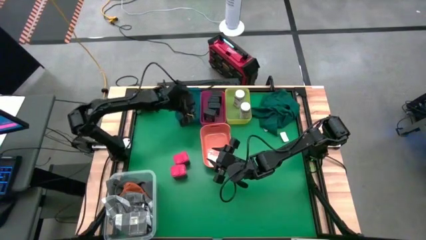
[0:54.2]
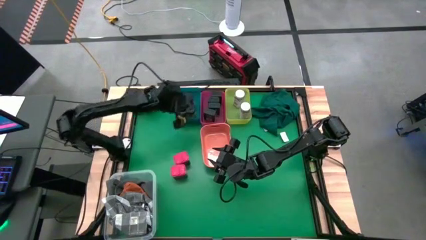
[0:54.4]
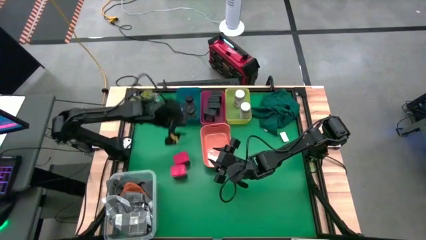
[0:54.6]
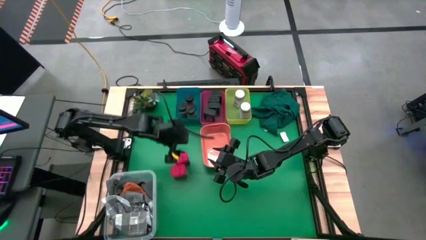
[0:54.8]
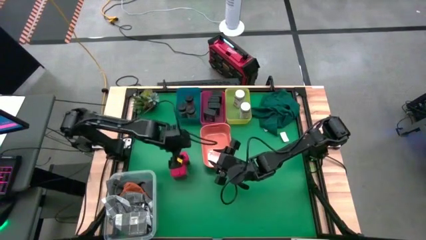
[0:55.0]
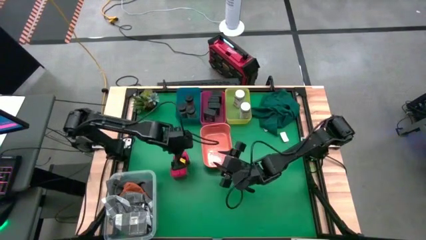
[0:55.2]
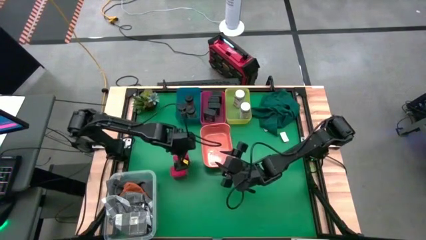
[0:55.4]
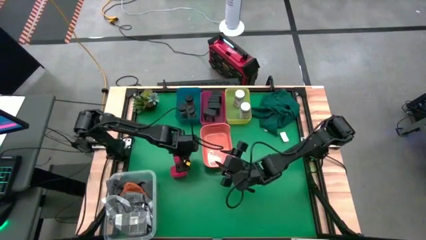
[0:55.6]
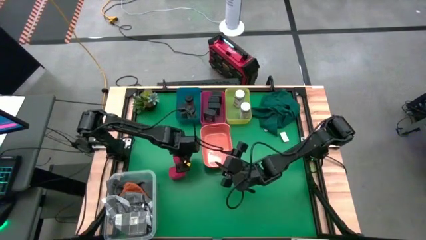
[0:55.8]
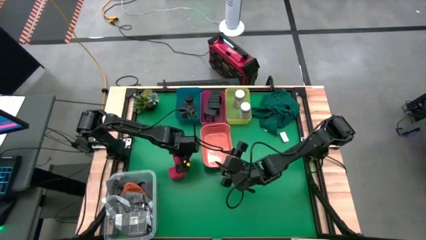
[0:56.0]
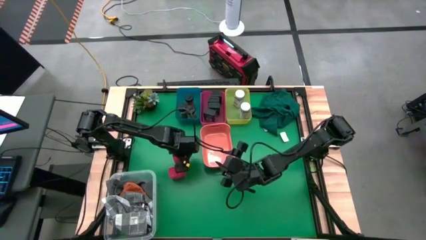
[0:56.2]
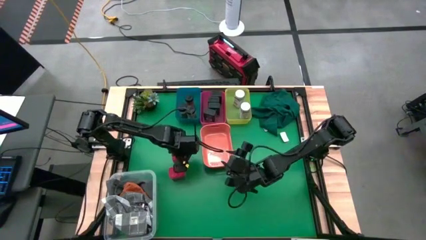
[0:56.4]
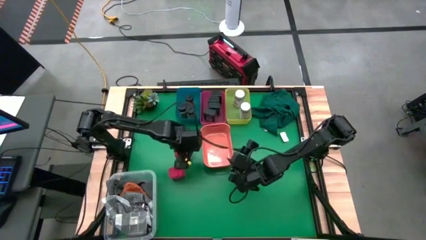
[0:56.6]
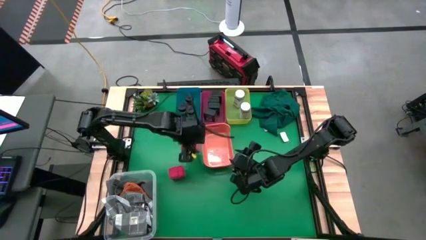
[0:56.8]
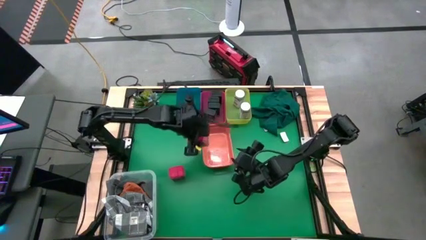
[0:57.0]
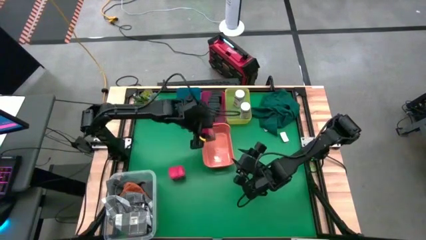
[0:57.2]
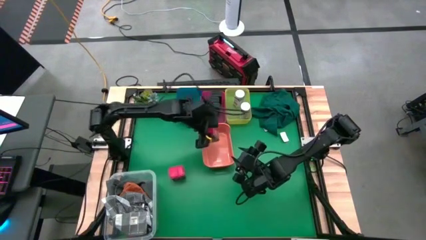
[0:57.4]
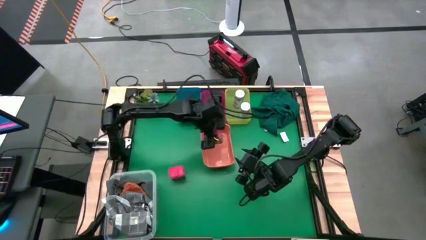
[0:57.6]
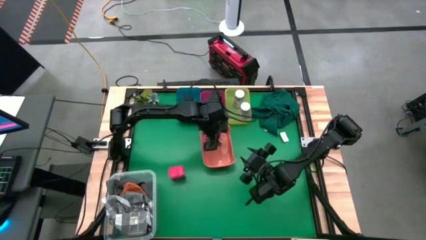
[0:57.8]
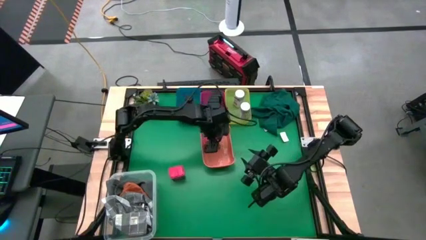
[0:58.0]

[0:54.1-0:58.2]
Task: Sort spices by type
Put the top red seasoning can into the orange bin

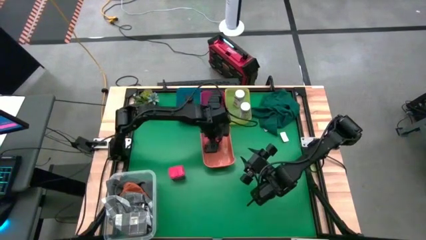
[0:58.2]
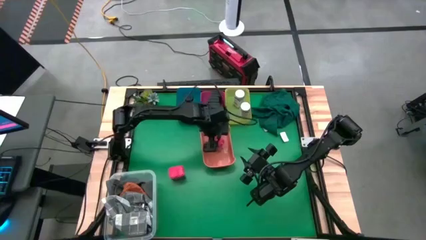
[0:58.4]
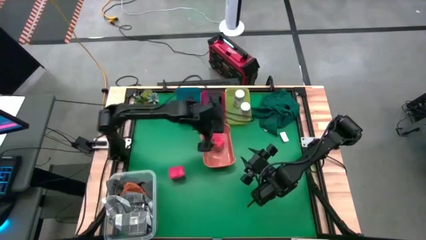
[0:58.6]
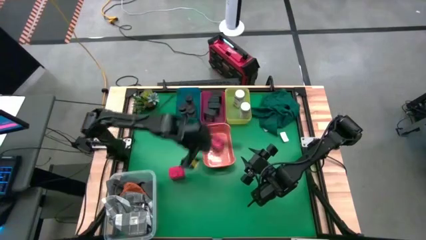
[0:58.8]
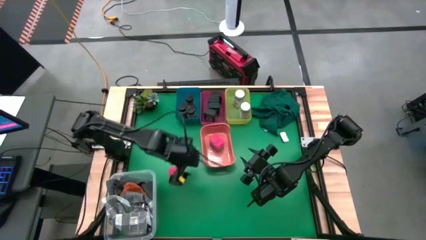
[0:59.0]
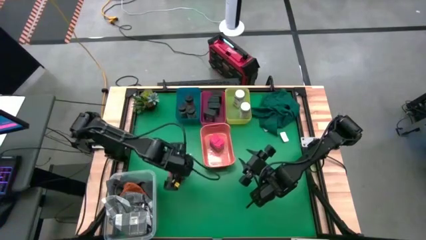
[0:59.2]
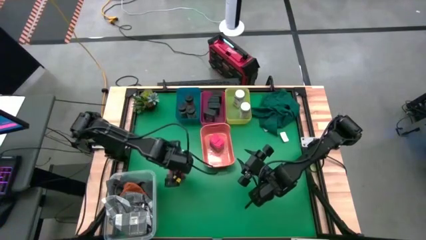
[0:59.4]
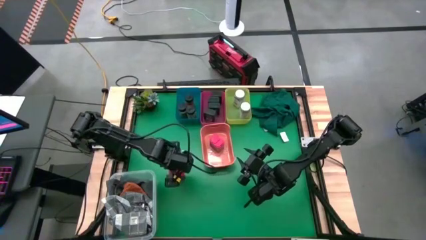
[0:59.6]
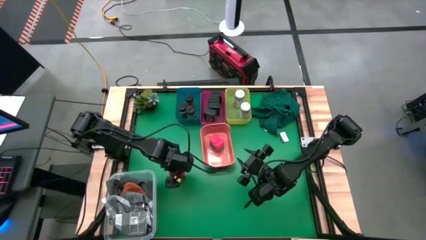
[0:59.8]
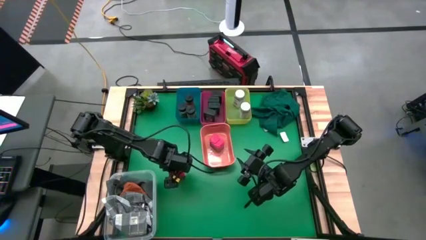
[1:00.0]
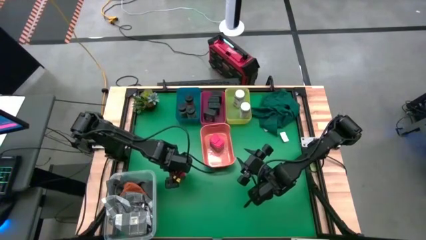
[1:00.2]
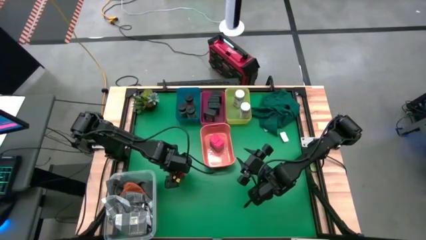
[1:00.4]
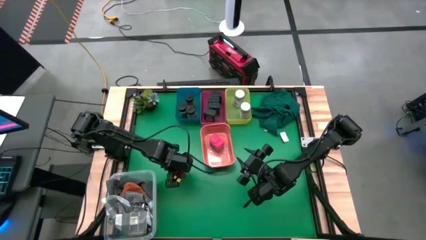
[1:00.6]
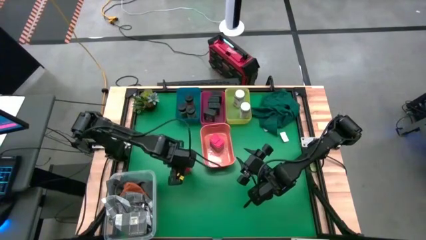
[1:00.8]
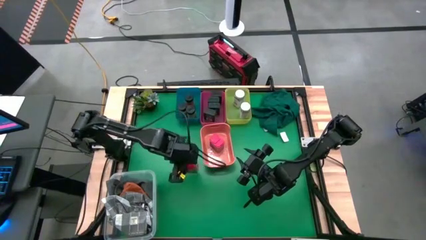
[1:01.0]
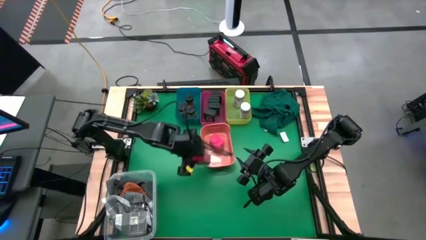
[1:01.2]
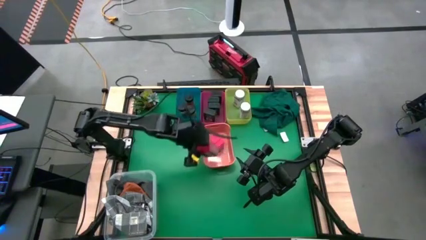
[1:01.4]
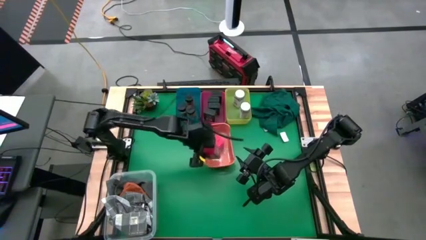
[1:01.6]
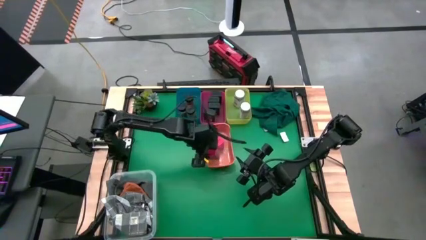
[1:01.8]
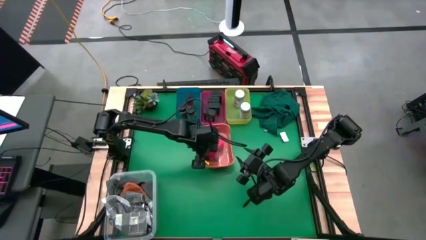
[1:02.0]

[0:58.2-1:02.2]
Put the red seasoning can into the orange bin

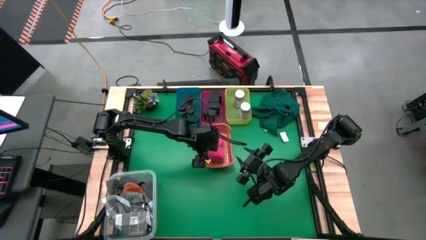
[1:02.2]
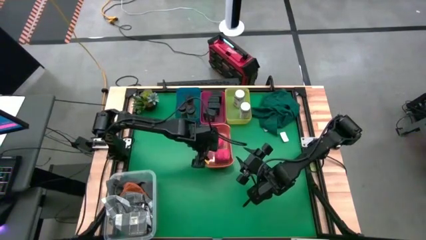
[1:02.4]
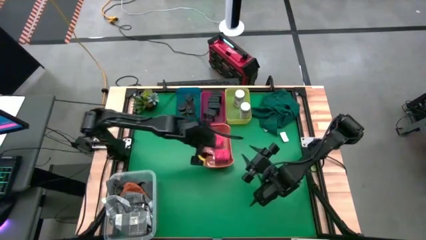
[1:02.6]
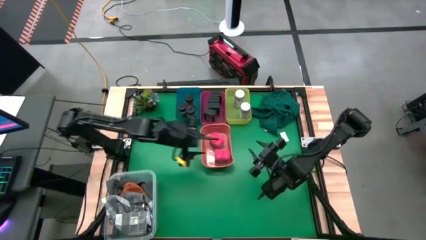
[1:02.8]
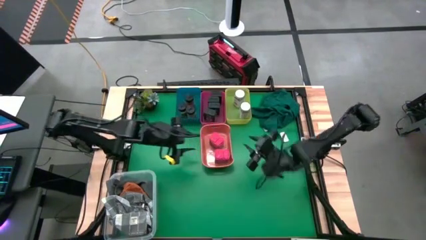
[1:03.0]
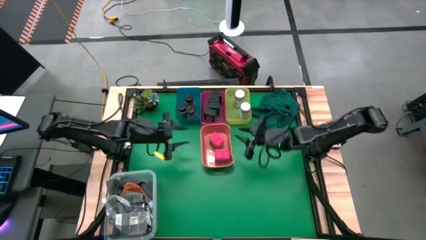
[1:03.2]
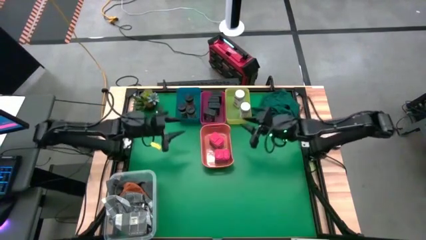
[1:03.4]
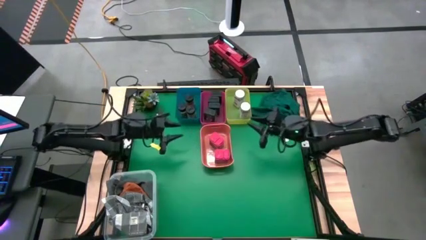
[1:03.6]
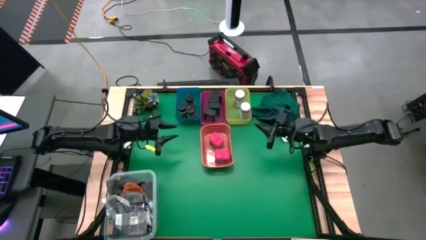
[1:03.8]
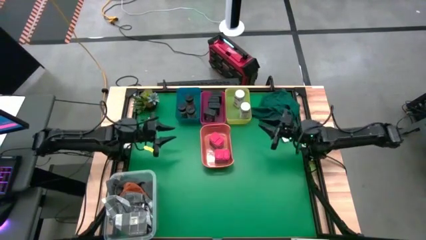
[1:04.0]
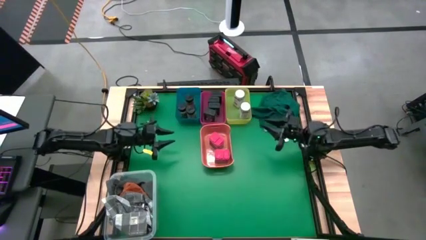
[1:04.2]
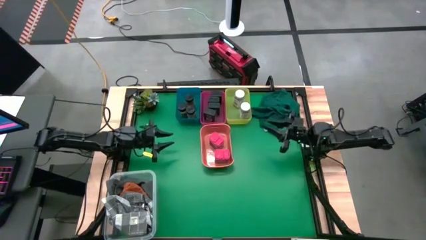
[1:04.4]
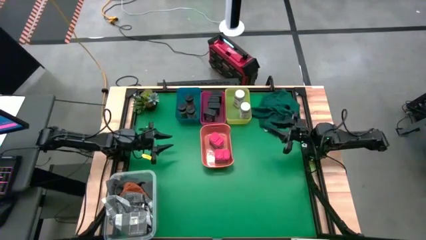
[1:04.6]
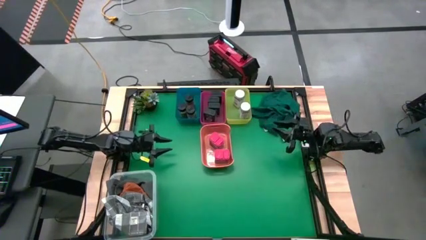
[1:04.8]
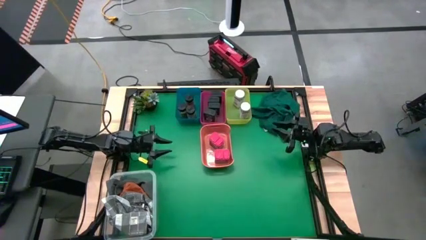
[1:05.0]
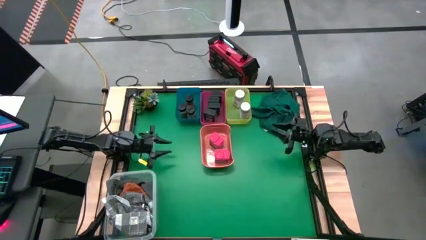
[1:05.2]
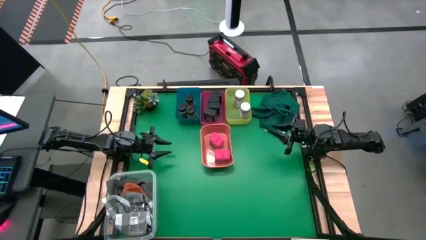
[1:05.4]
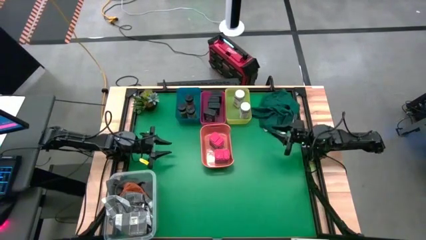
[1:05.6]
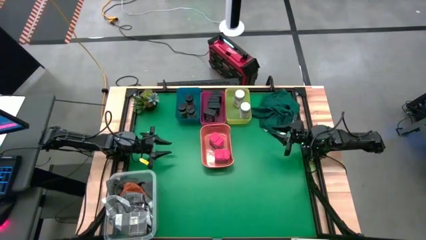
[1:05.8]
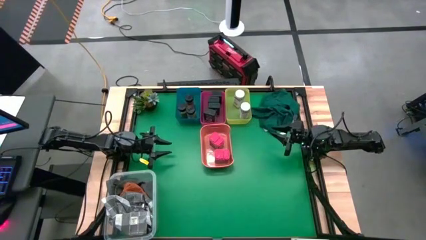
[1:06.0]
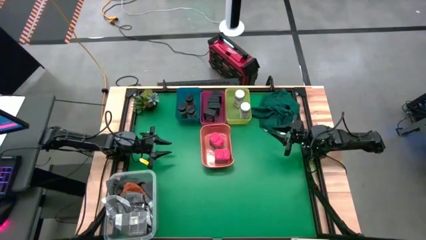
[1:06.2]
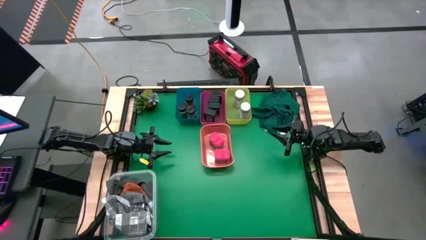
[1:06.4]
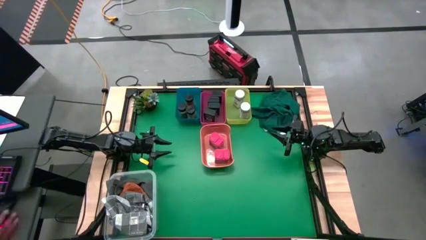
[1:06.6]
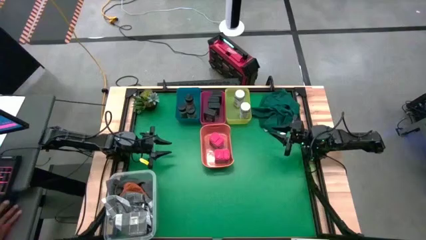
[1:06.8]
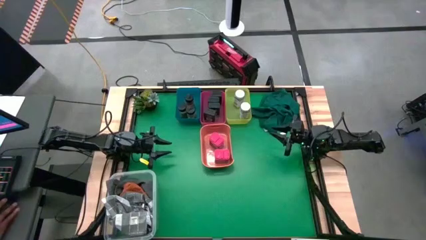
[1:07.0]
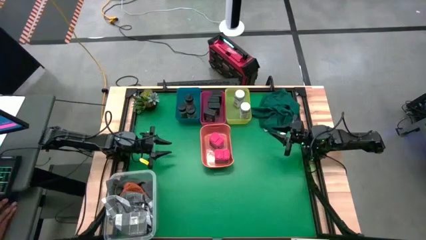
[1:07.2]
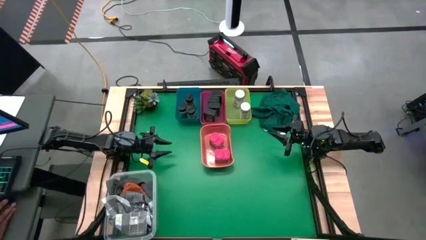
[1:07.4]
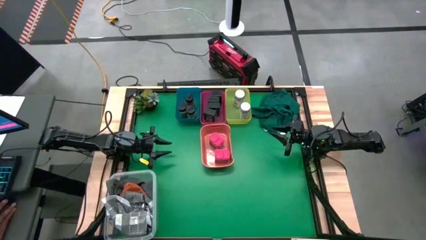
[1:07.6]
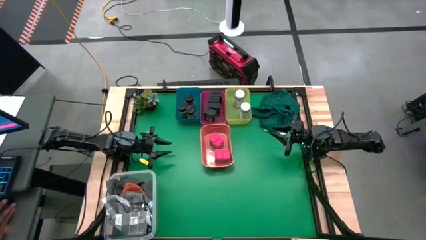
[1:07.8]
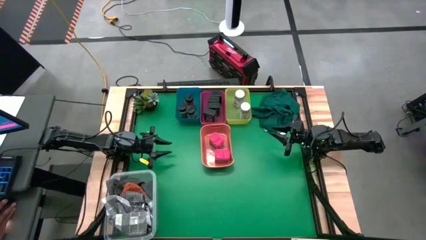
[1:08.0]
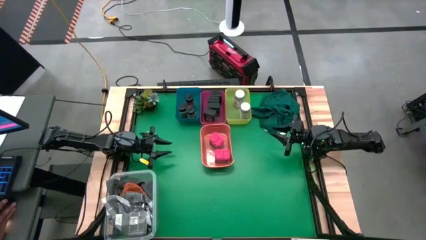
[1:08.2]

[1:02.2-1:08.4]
Return to Home Position

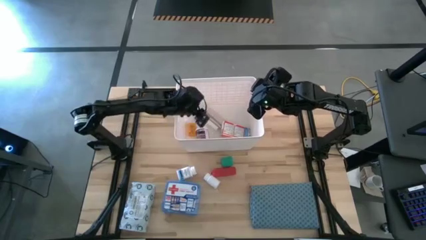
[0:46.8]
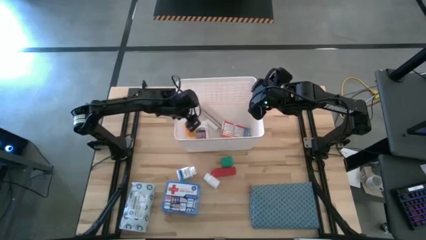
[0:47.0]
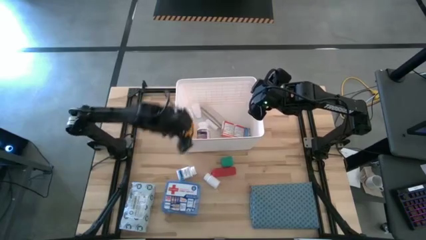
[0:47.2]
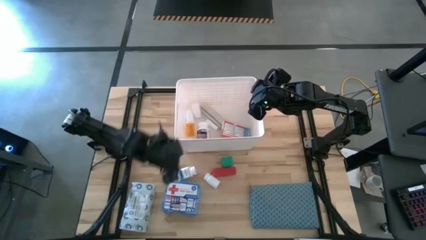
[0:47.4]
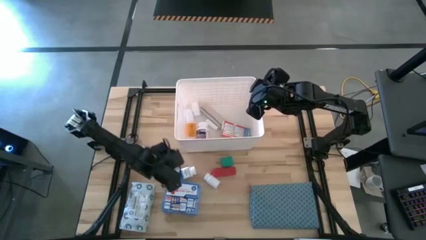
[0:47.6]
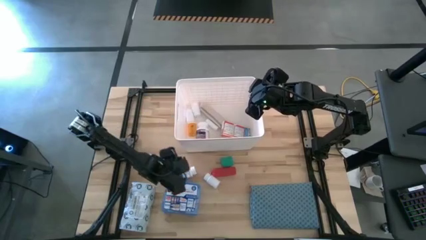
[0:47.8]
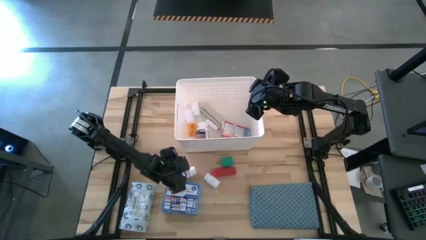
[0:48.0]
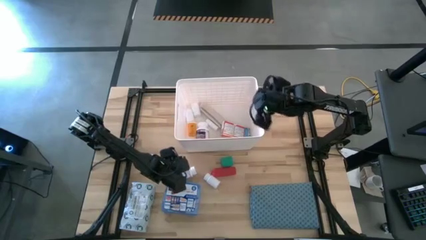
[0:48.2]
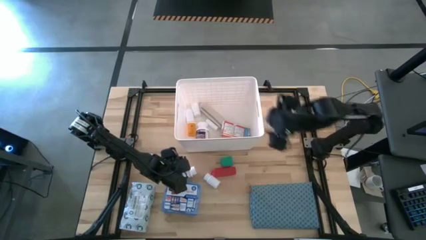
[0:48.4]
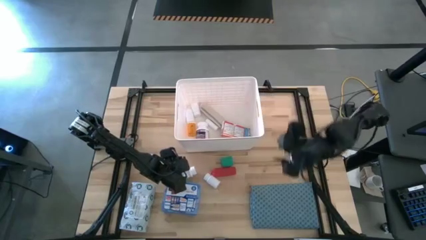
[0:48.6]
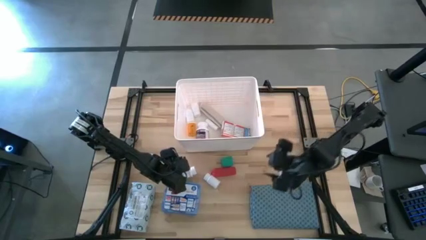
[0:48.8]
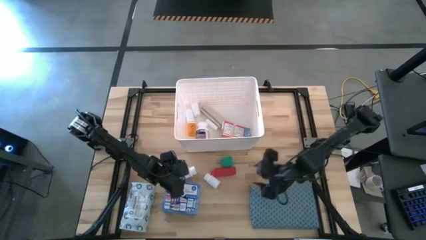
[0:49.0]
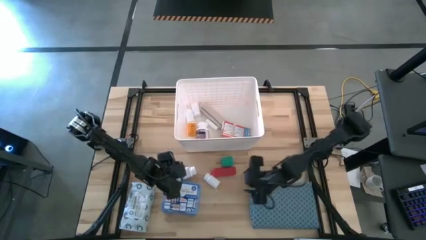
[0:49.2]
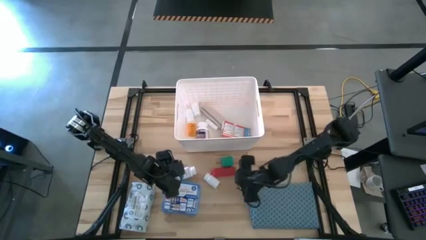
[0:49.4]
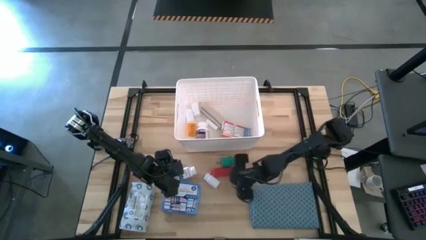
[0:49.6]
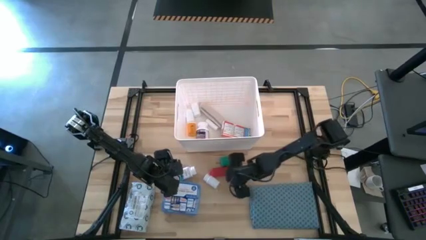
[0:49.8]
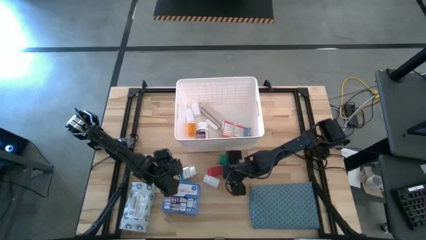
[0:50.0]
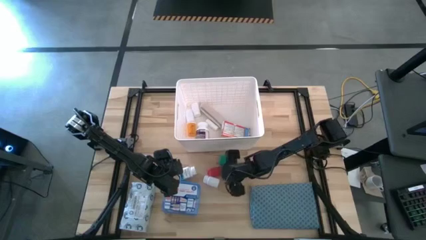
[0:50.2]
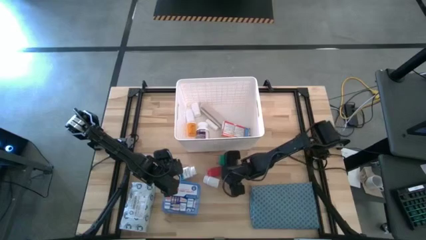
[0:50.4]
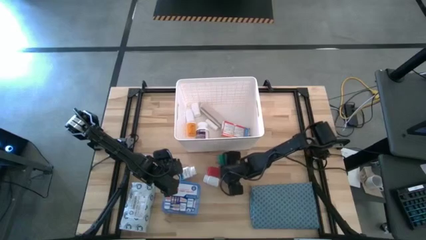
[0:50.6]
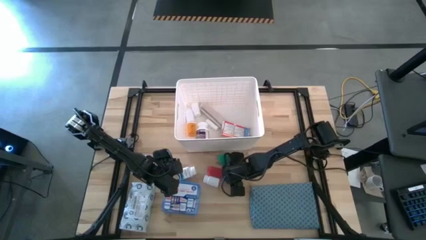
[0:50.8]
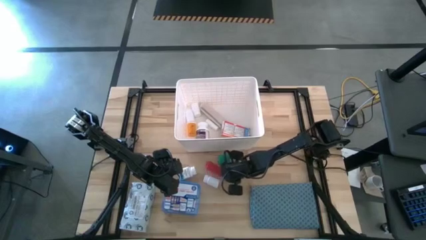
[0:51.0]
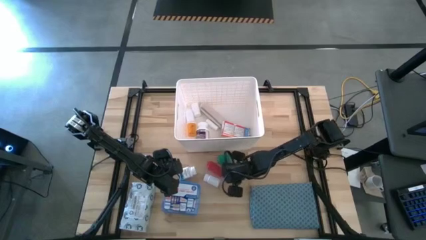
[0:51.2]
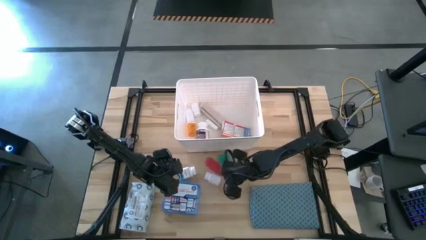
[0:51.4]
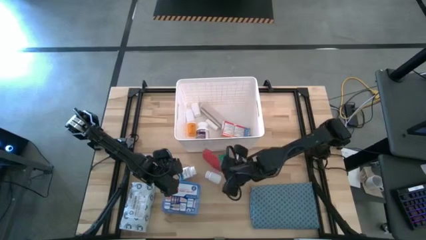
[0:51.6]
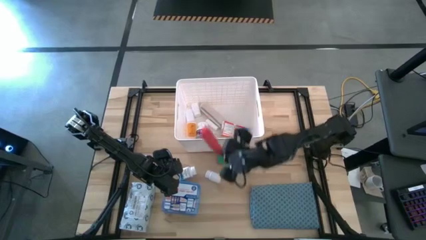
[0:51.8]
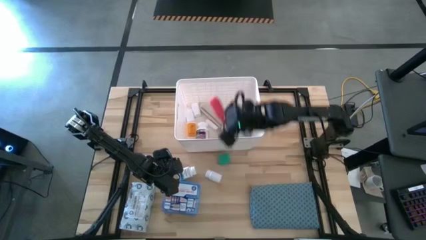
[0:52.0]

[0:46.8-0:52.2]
Task: Pick & place medical supplies in basket/bin
Put the pink bandage into the white bin
